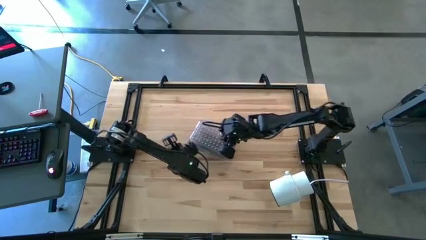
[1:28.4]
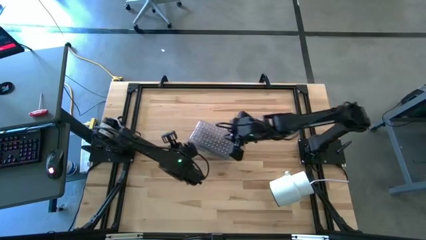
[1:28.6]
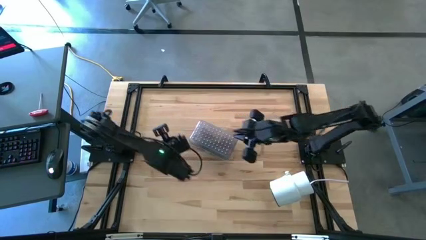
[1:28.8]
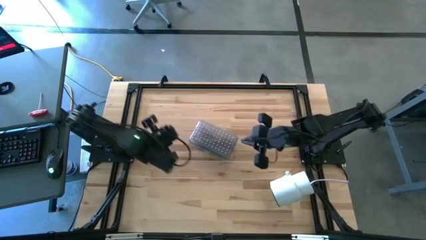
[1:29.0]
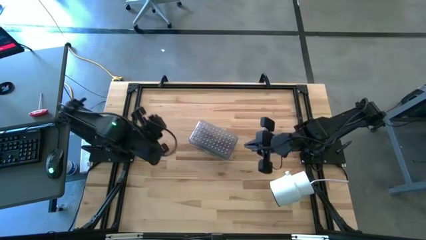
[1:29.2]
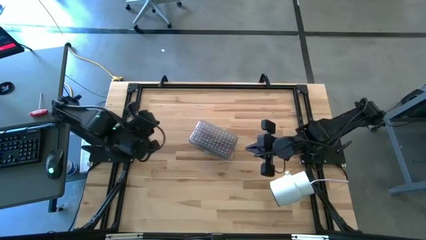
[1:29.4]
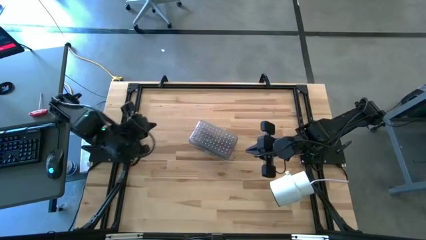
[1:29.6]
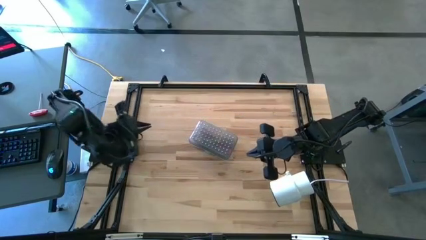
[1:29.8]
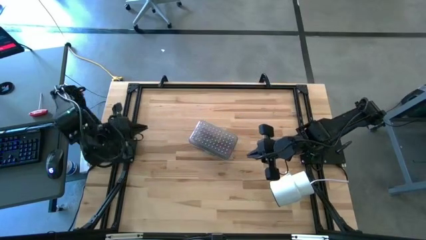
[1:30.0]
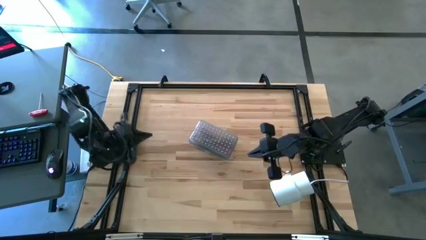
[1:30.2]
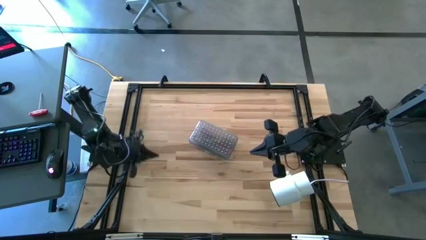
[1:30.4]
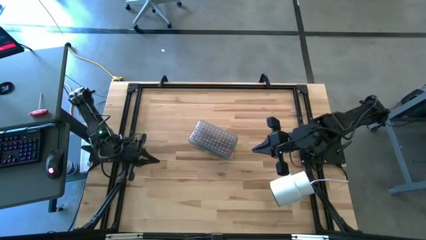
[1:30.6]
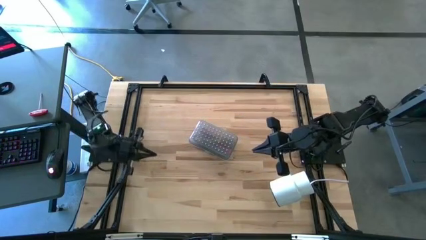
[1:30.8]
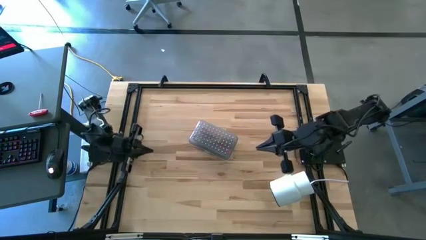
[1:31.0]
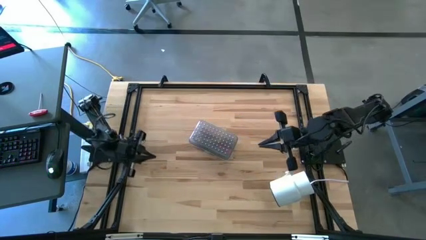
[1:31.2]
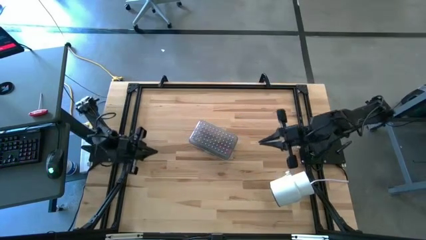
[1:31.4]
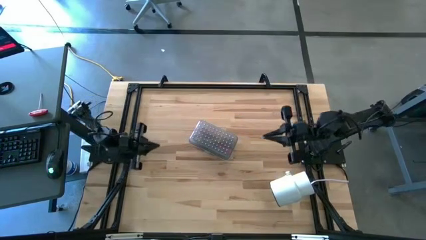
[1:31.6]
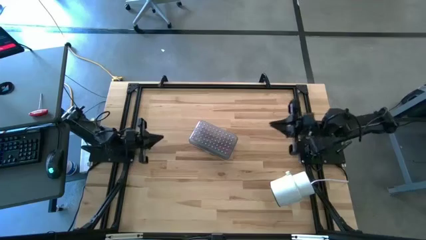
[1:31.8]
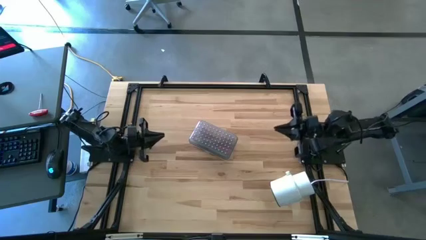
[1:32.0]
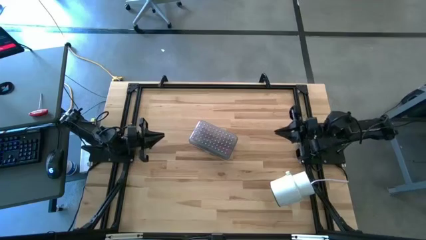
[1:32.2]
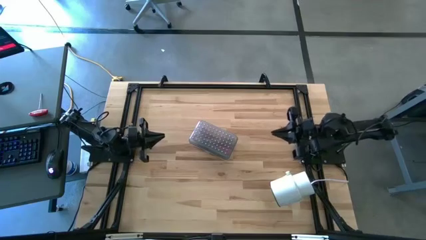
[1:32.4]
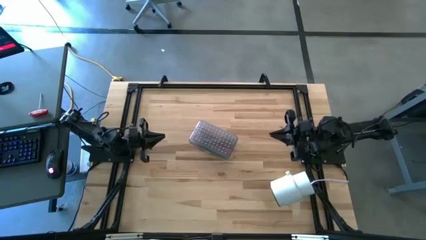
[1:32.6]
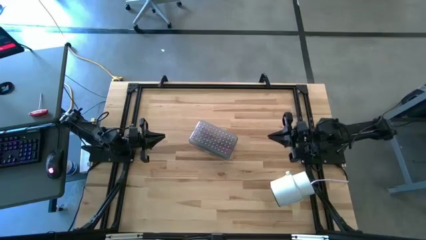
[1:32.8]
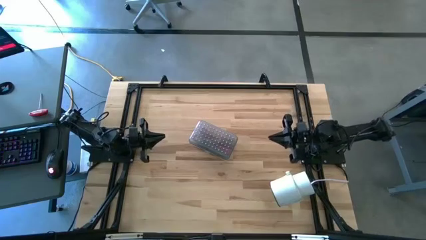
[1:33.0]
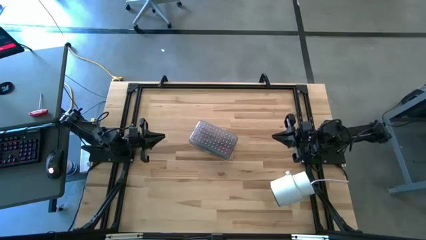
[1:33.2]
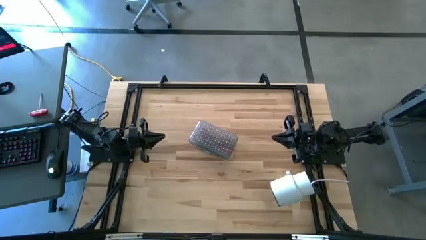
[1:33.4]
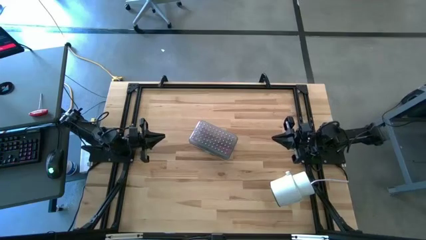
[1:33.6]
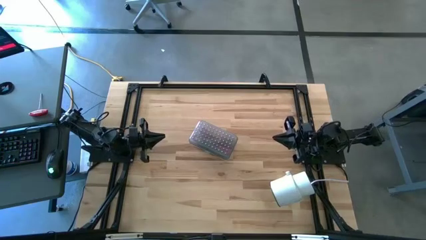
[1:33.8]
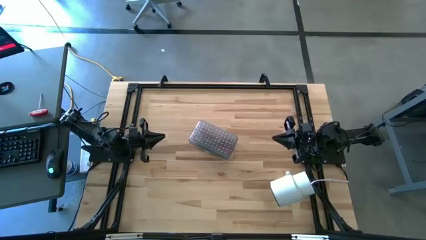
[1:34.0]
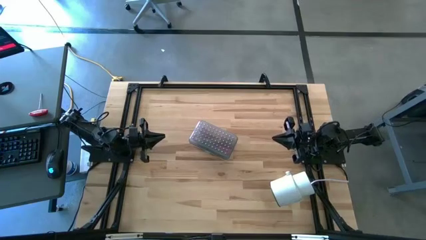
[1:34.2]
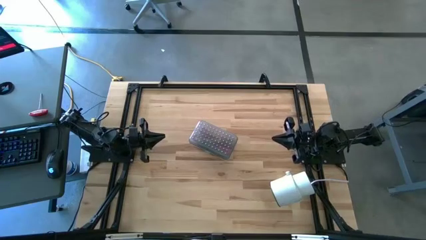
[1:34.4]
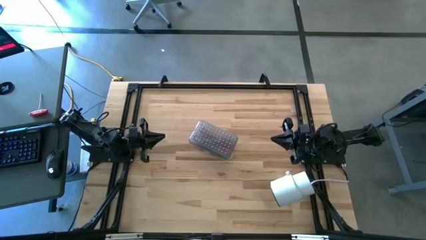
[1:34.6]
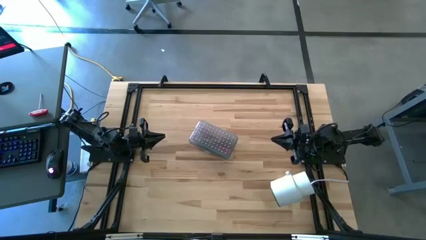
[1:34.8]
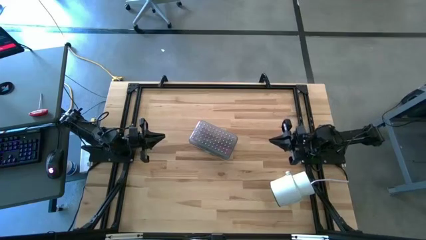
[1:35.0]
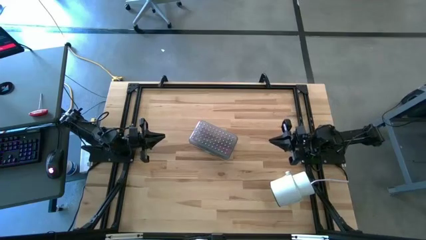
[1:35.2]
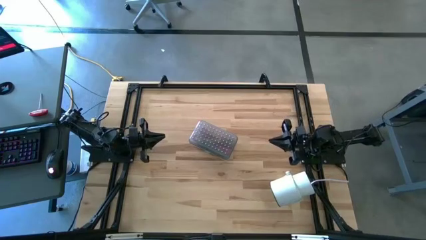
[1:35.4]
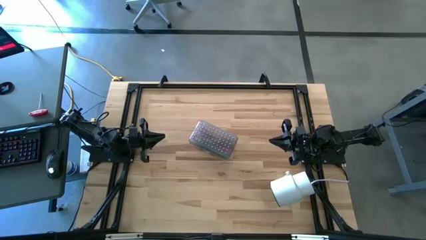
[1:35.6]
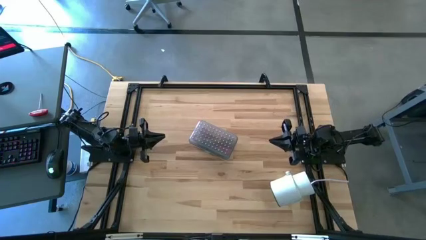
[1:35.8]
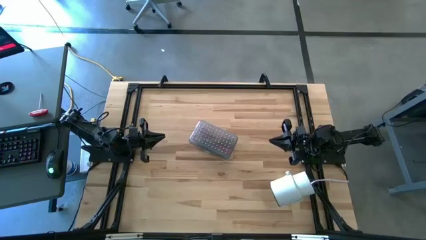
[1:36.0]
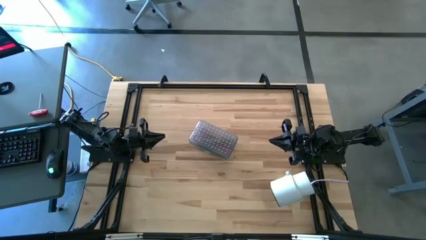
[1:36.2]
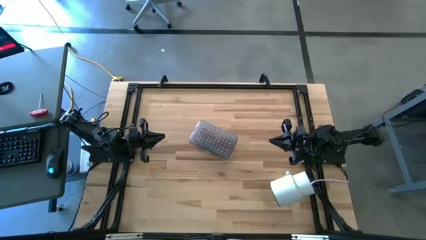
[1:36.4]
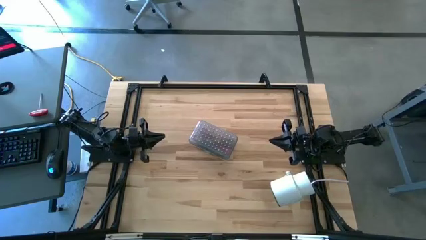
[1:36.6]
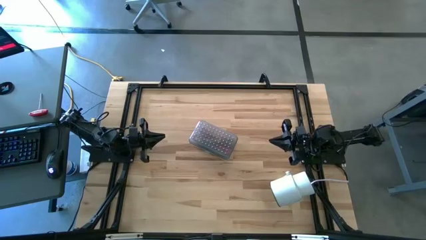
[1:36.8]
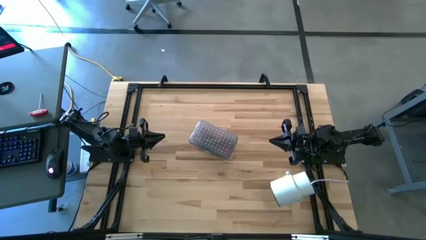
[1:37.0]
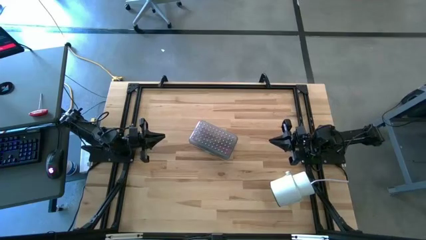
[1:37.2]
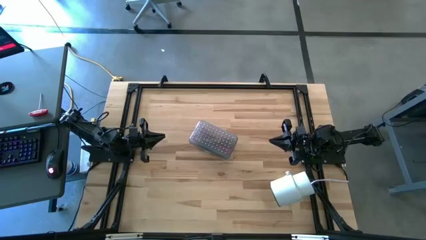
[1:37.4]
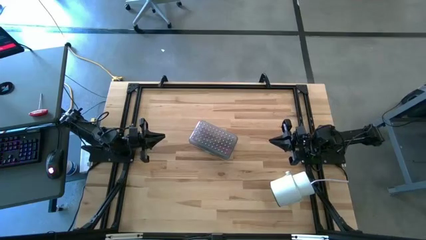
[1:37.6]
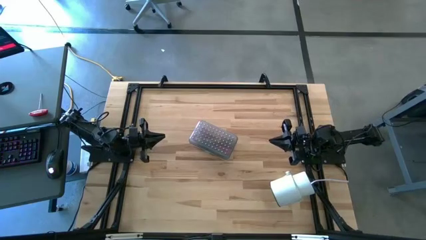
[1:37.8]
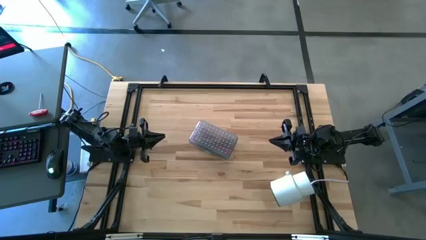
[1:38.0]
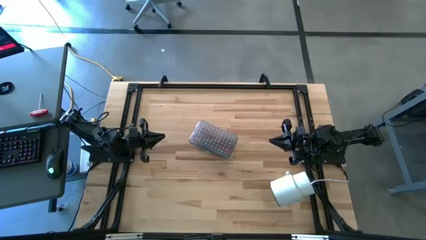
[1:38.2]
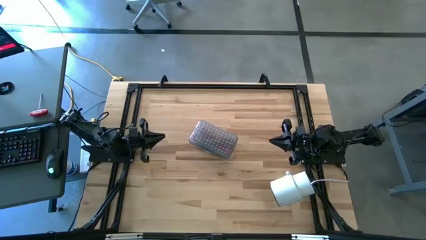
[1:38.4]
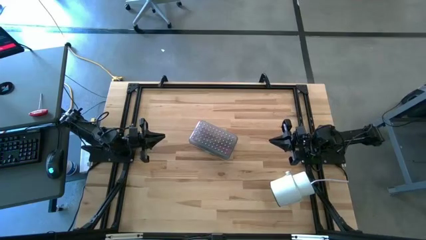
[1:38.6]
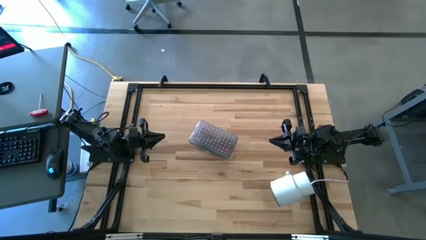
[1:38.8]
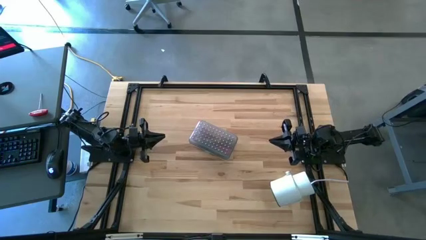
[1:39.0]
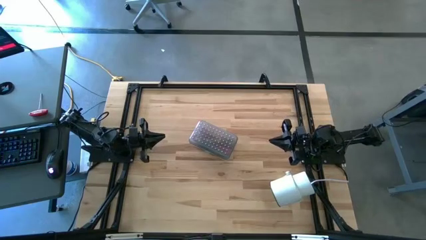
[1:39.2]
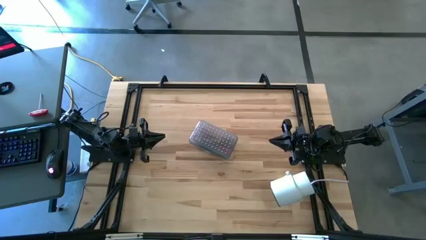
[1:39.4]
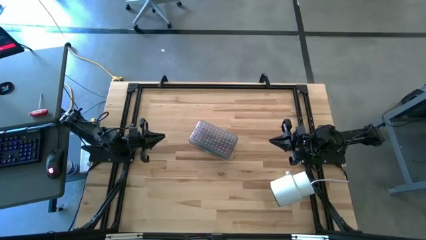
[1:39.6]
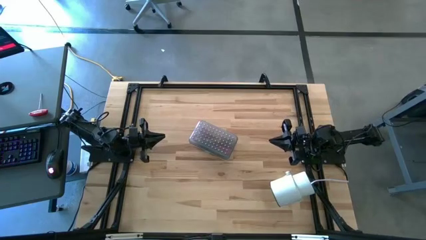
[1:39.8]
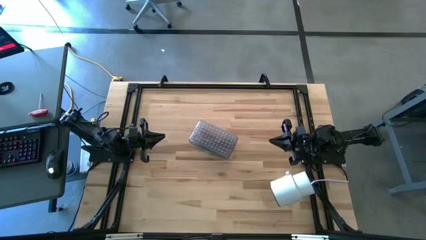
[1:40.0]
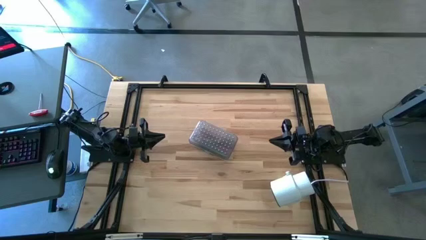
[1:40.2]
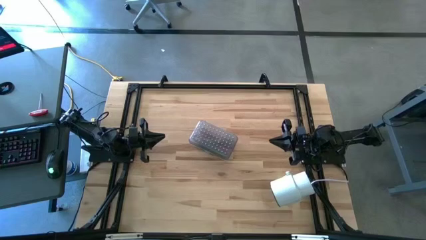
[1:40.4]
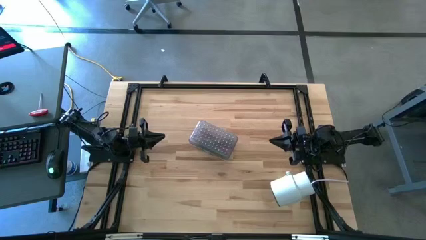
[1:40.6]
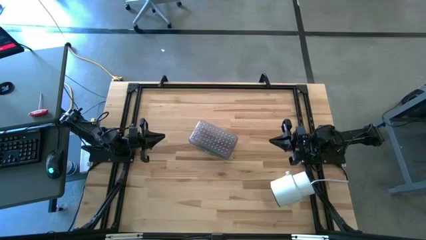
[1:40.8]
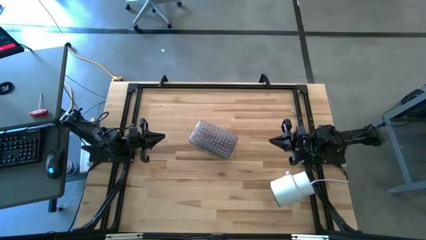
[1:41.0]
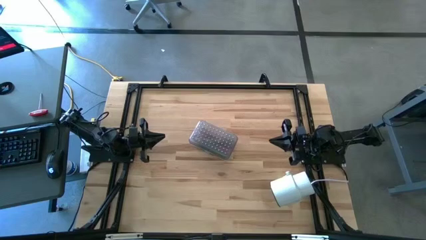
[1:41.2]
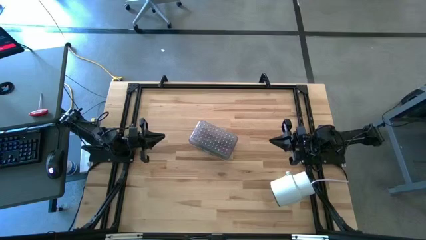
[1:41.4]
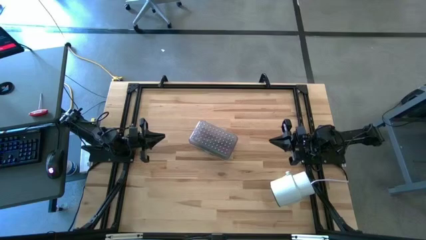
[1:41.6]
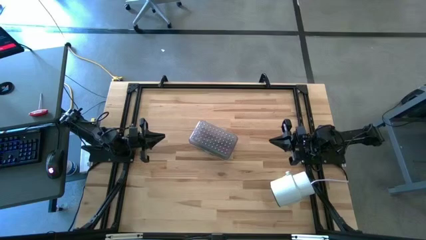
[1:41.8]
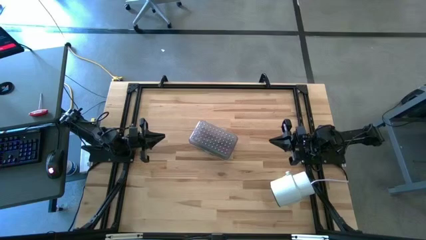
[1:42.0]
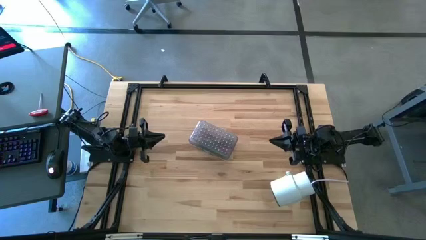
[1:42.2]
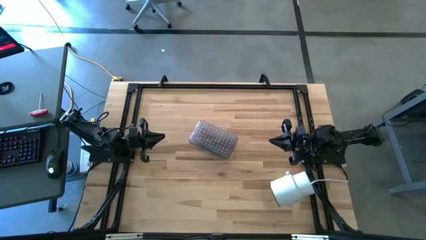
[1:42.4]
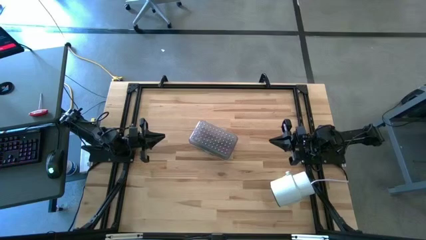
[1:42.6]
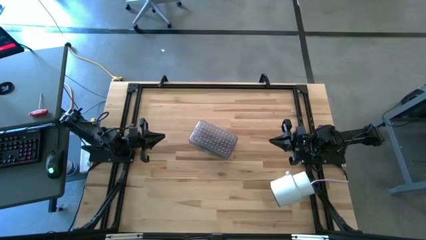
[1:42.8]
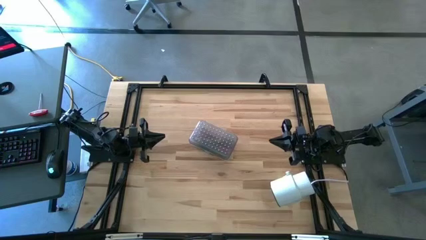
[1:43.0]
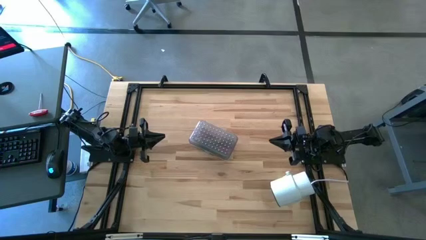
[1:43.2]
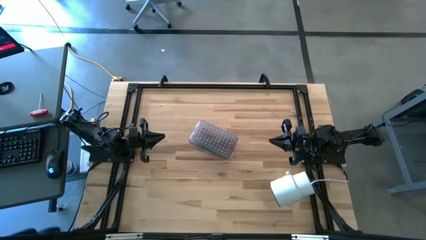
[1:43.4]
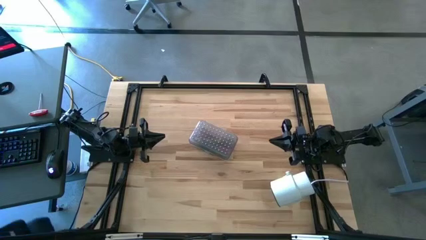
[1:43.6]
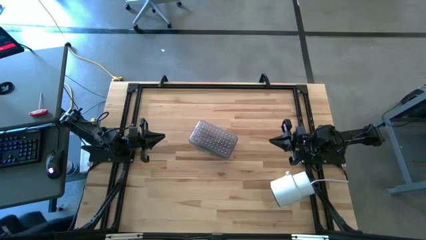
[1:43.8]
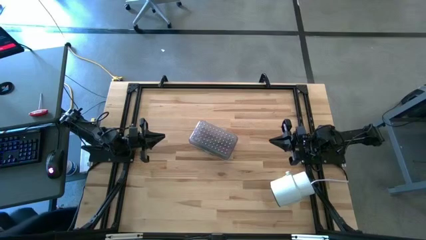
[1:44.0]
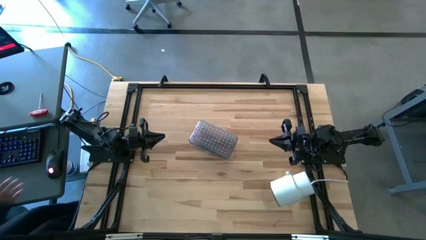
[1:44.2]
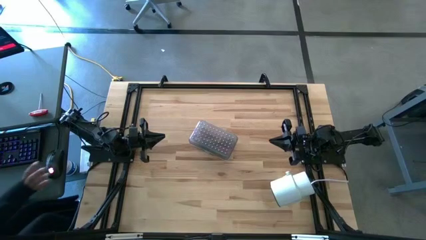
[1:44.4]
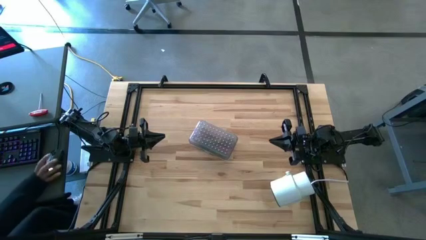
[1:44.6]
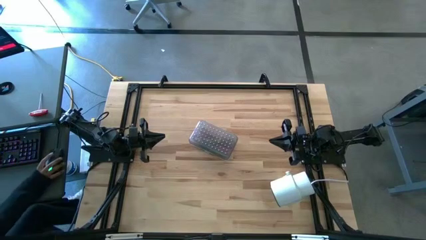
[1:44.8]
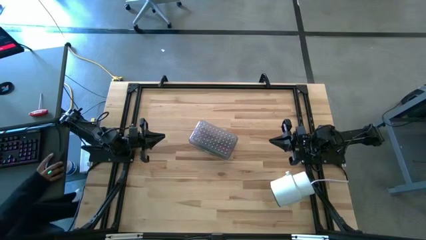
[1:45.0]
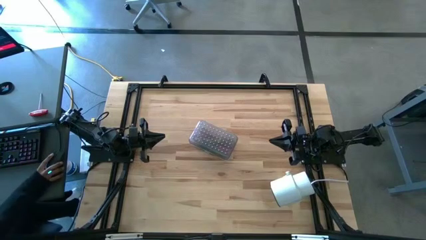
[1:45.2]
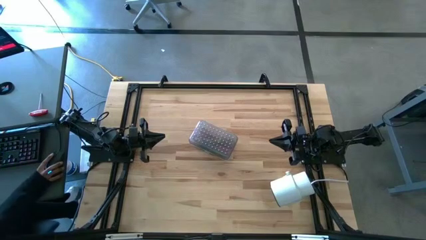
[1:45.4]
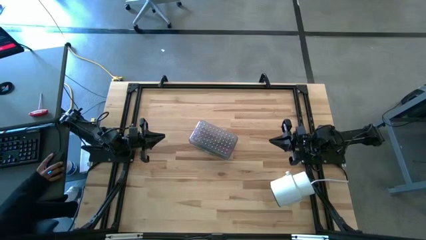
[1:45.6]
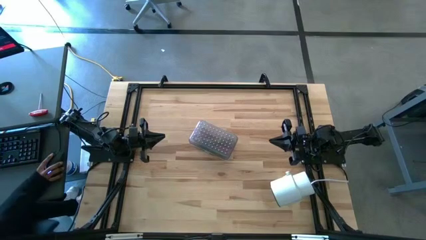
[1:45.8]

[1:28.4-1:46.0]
Task: Pick & place school supplies into a supply box
Return to Home Position
